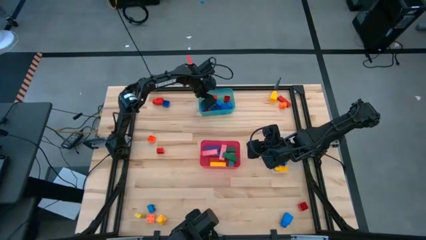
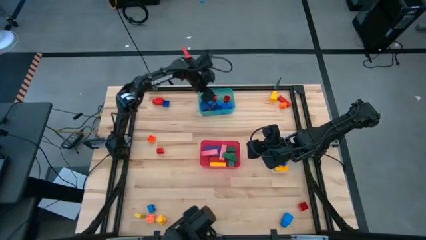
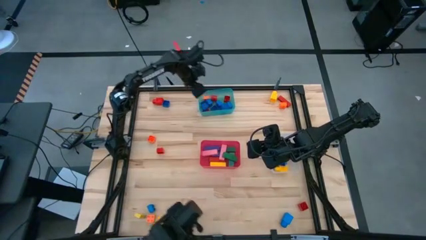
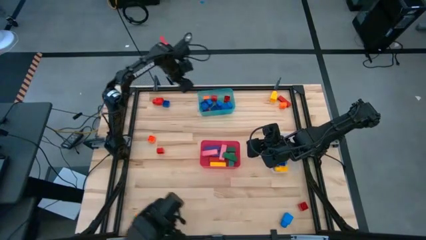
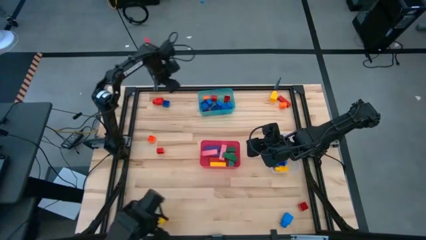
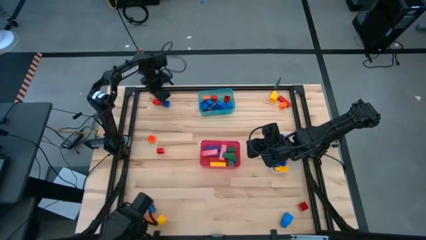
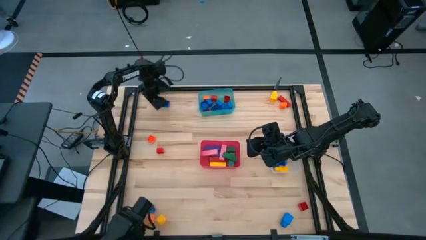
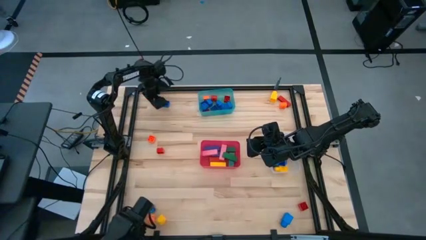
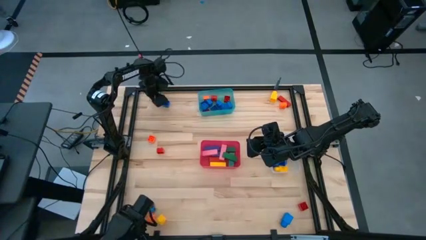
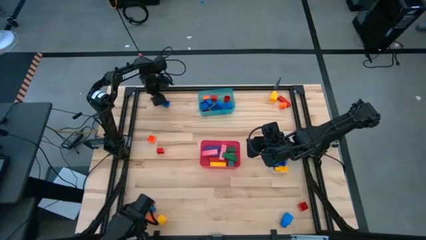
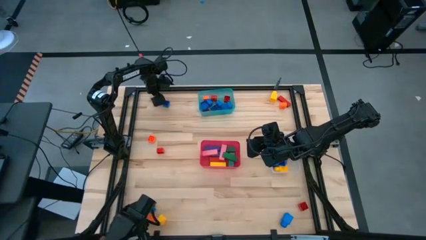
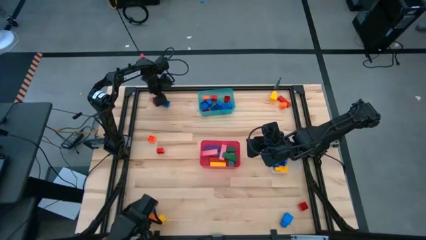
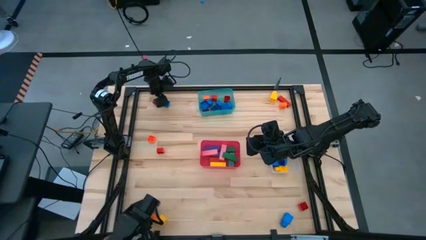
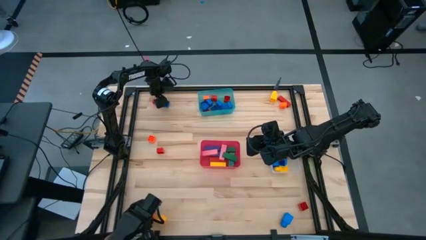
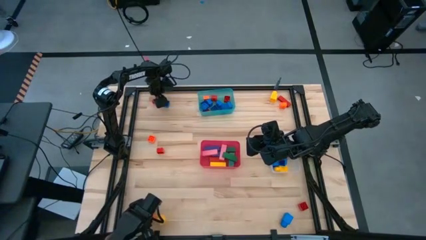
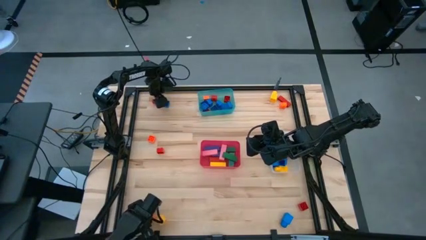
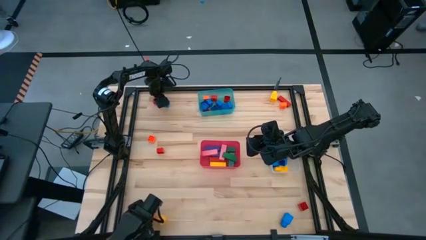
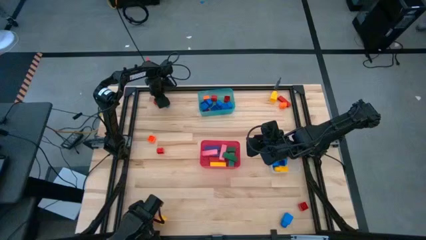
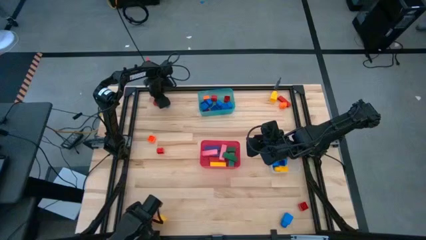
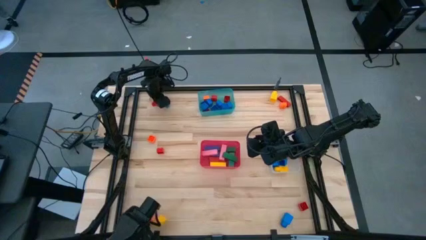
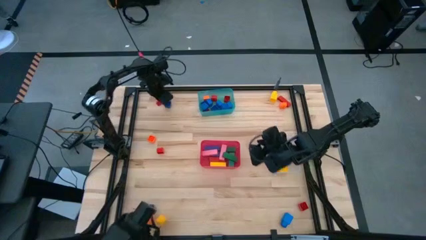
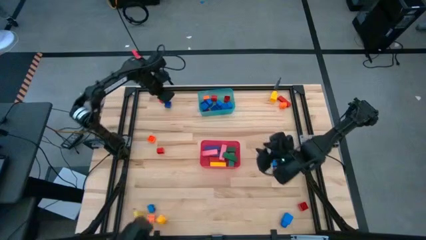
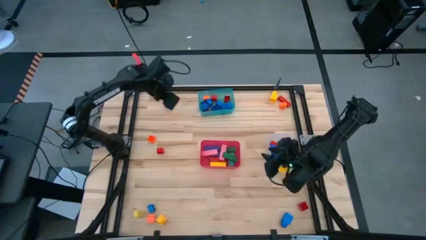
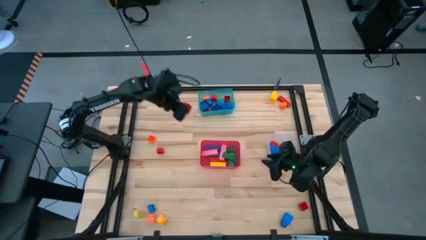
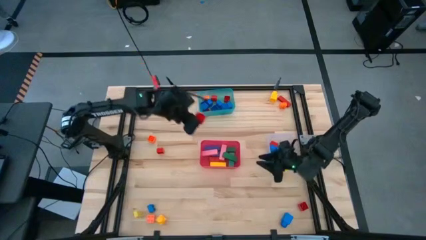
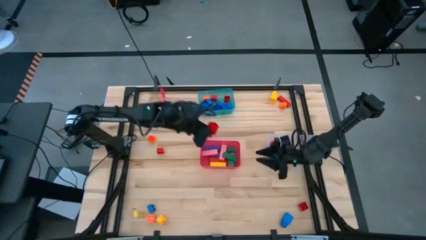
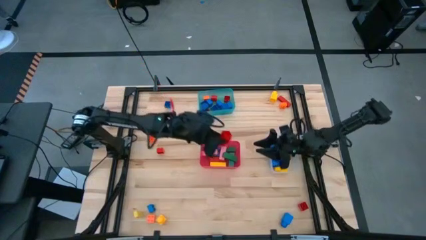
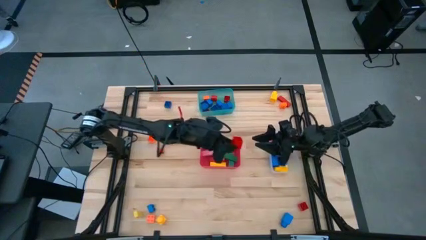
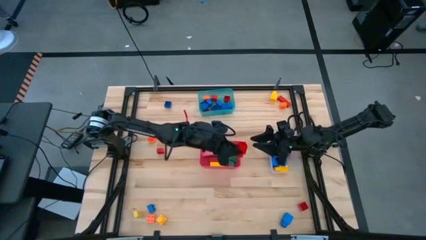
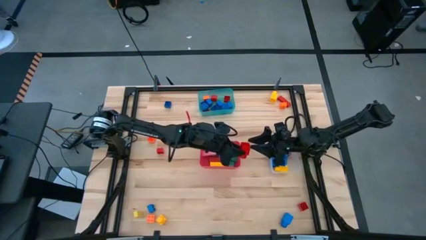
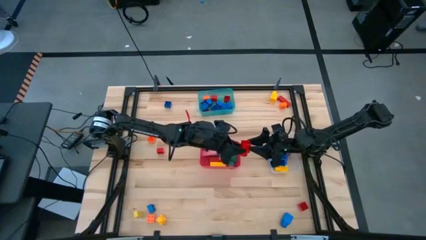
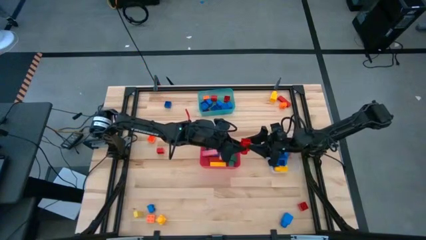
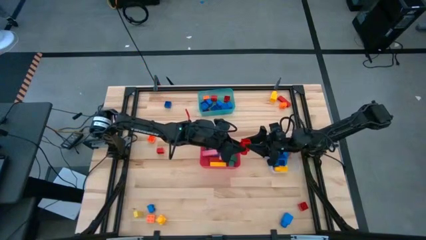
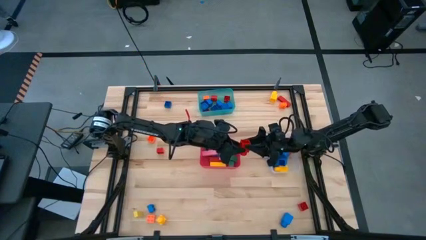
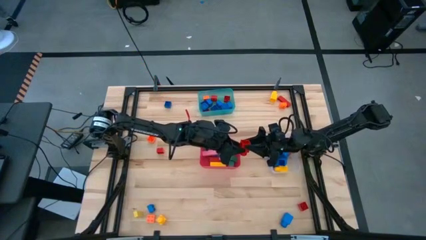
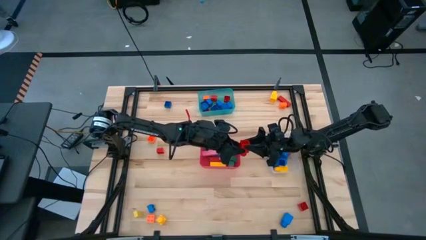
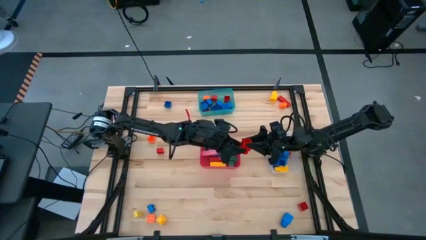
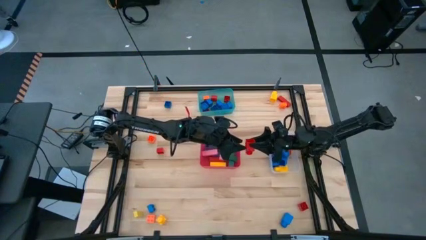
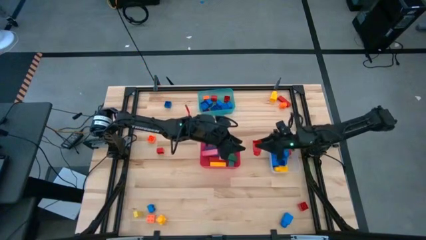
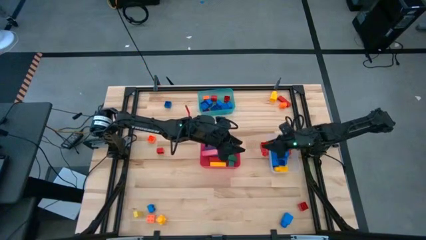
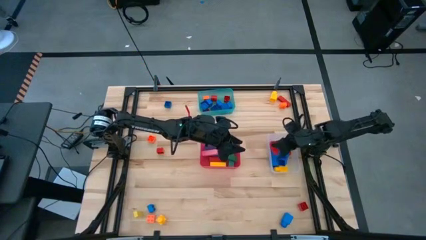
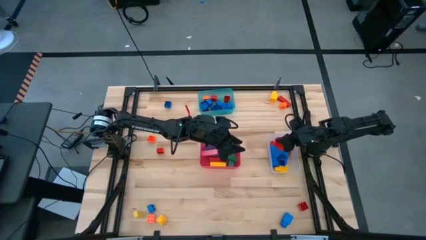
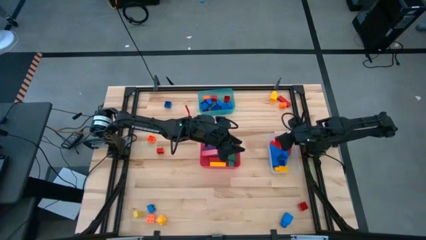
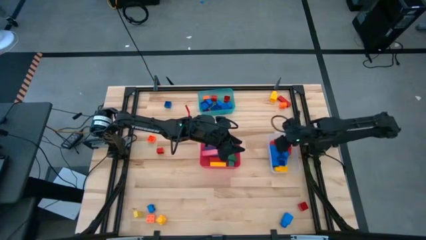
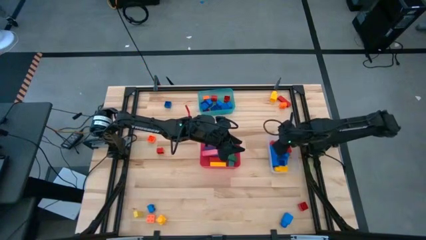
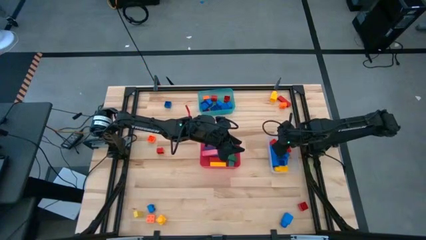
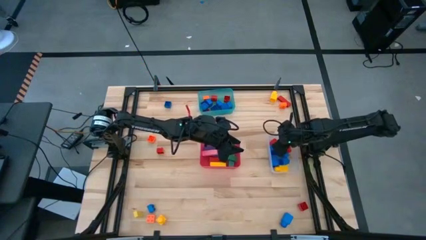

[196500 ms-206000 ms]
Task: Sort blocks by size
Put the red 1 stud game piece into the transparent bin

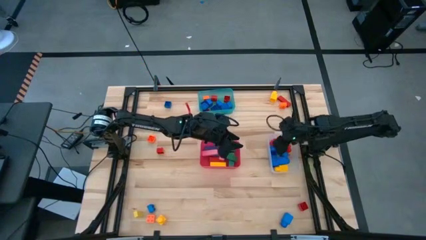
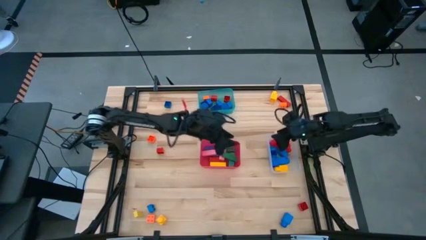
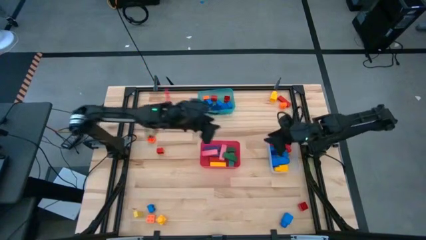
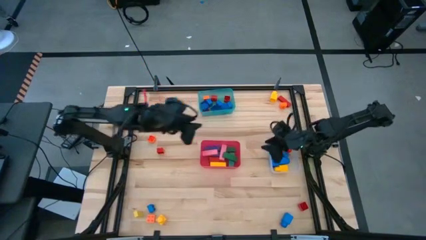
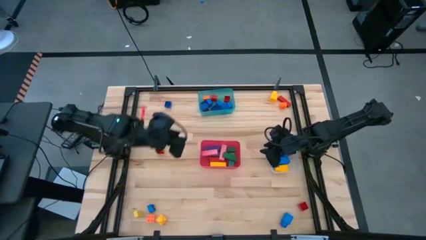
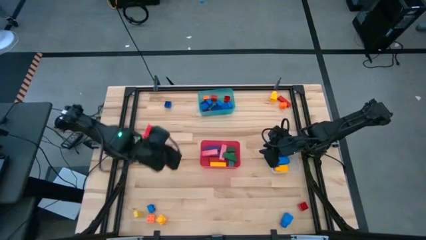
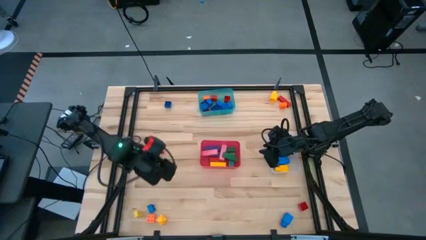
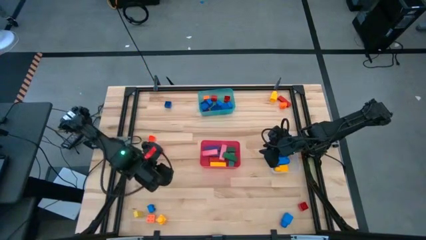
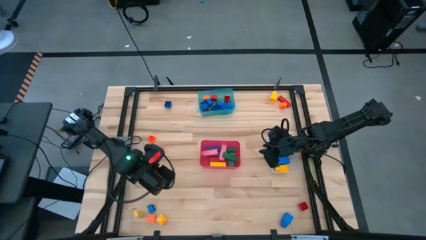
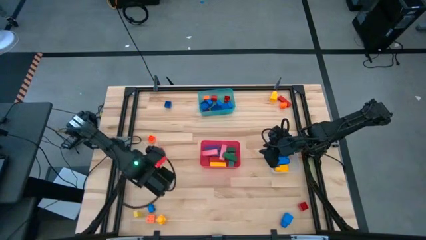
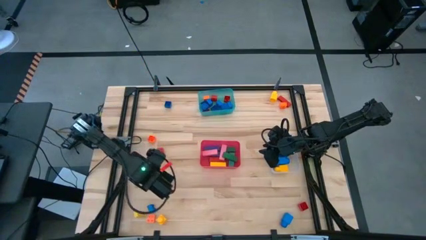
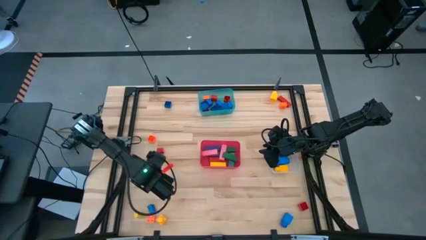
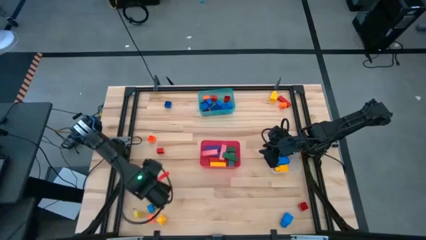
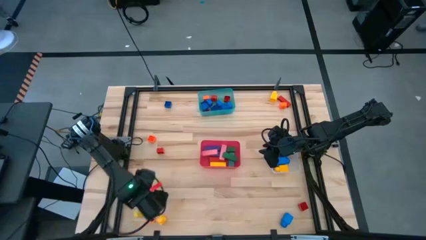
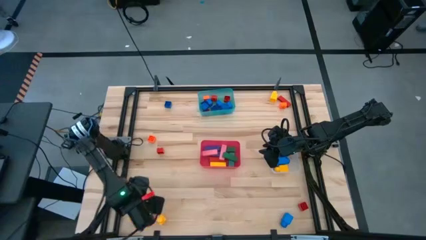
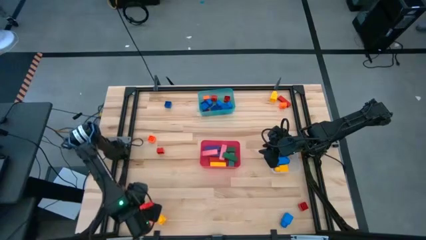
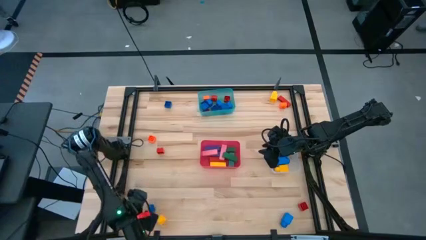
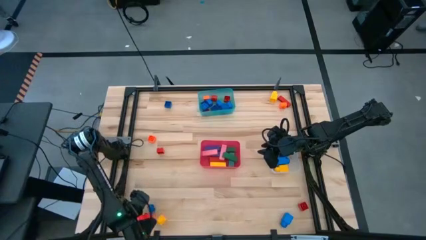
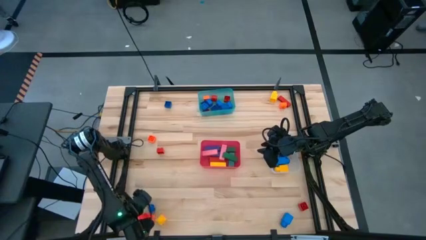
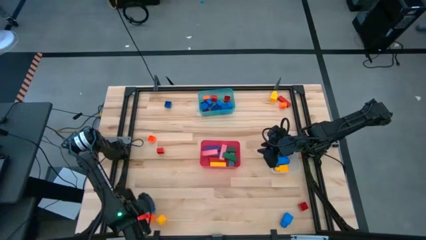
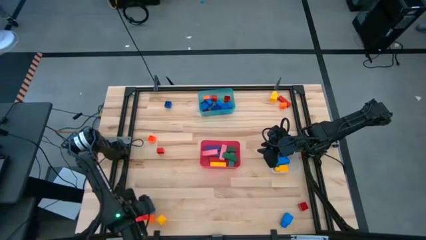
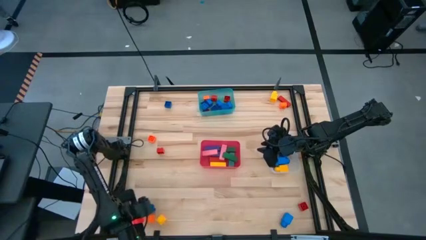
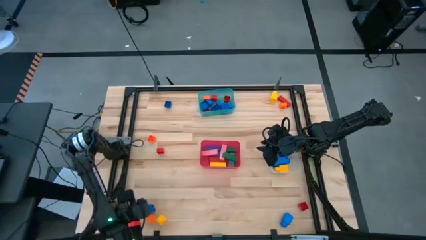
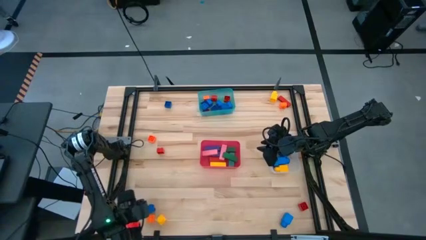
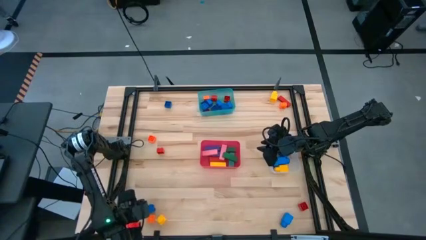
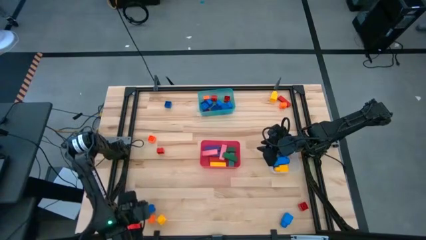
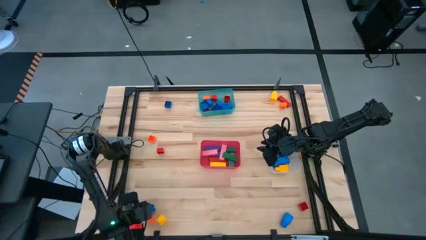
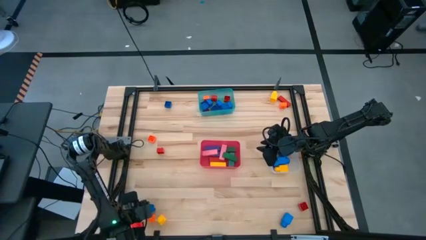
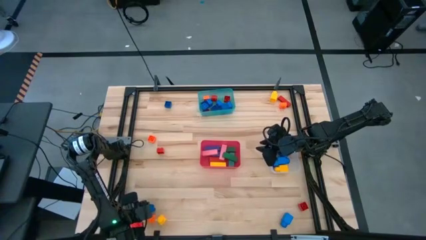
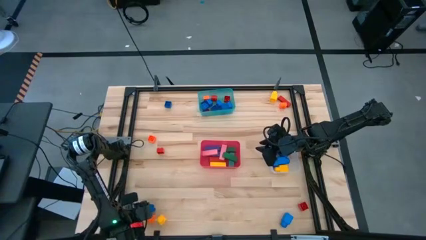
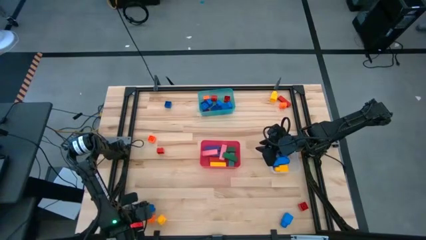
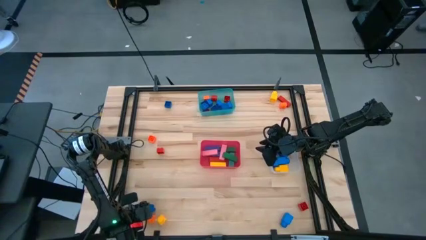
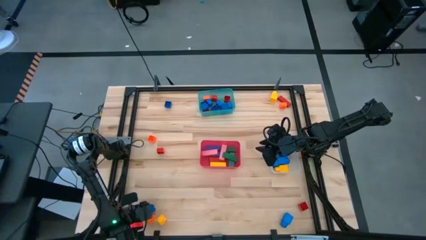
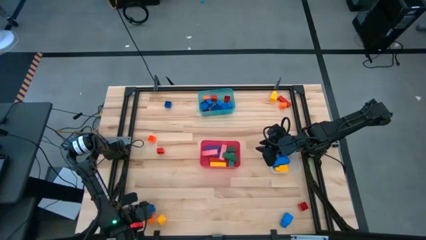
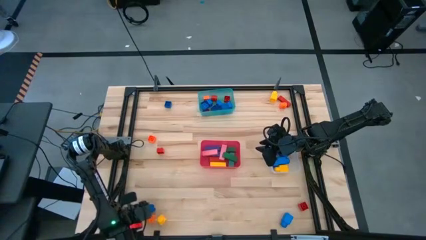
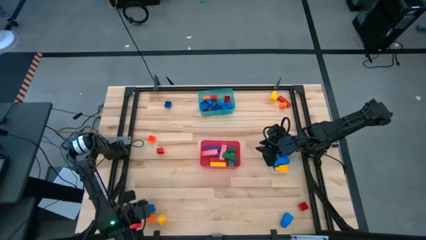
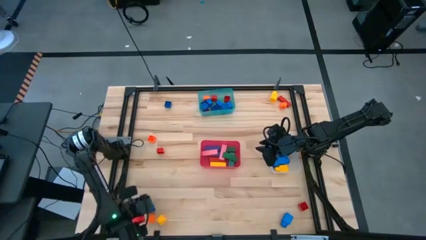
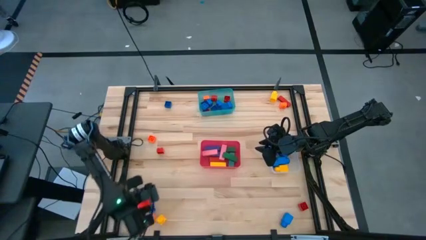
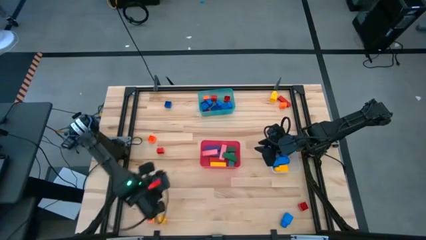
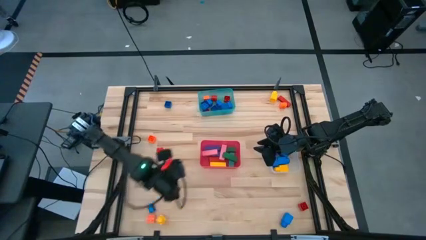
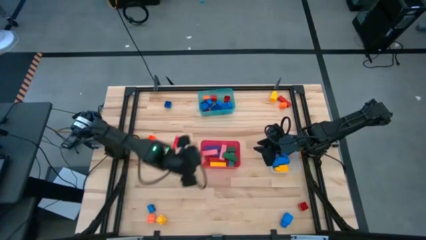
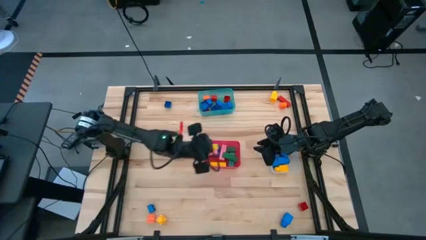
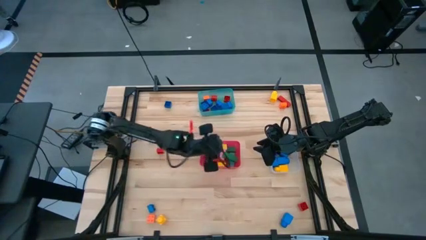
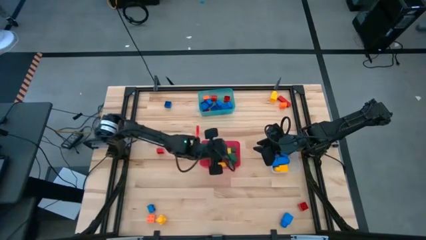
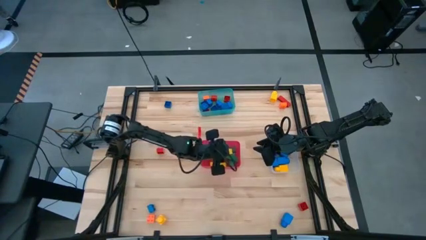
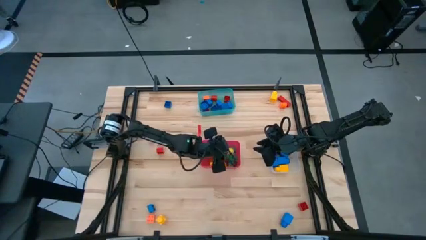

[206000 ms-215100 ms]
Put the yellow block into the red bin
